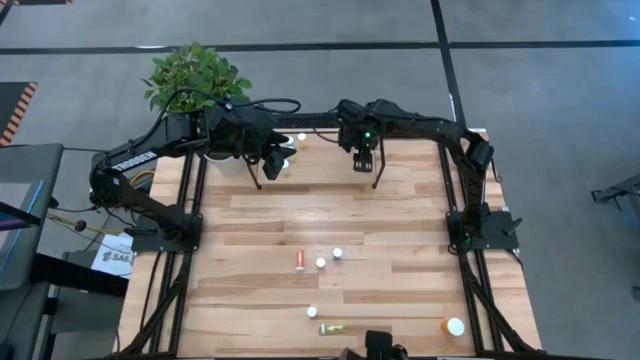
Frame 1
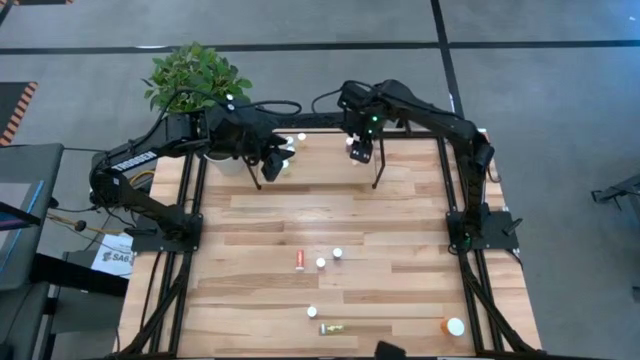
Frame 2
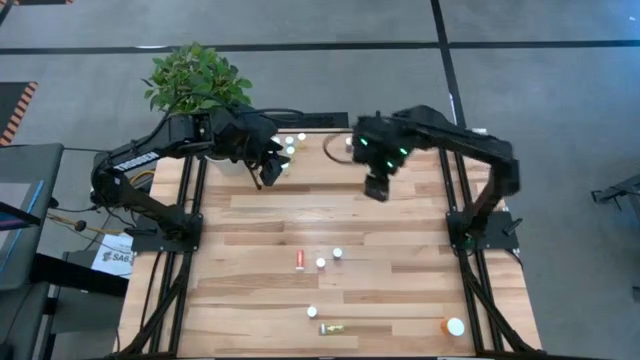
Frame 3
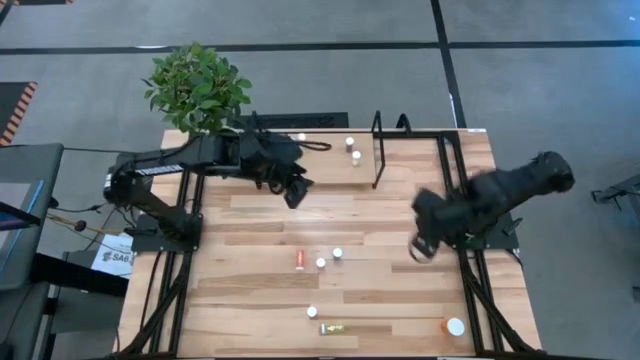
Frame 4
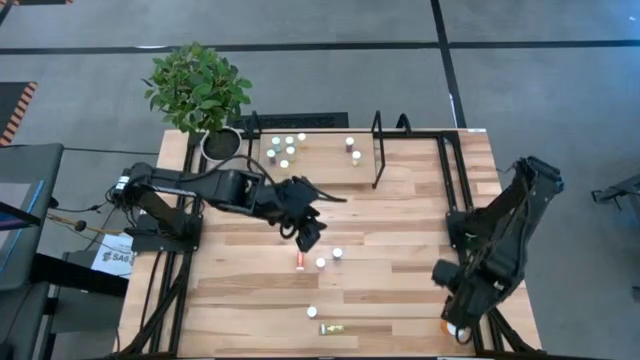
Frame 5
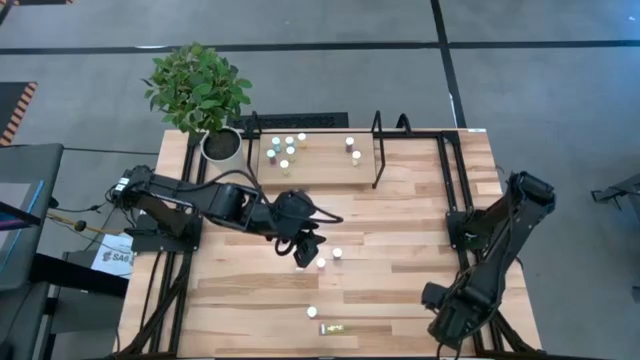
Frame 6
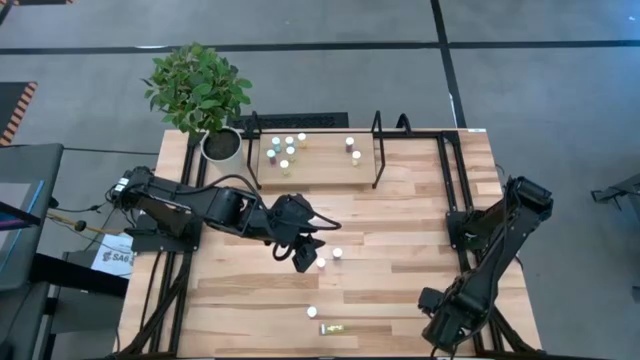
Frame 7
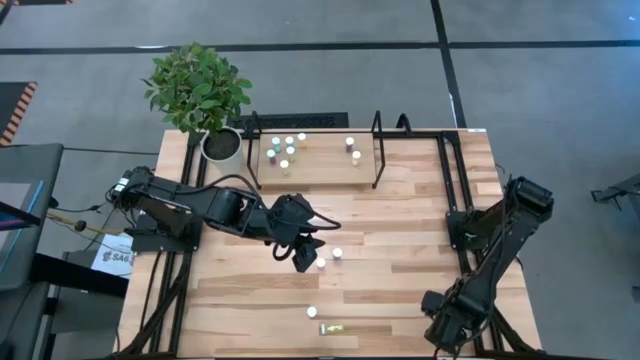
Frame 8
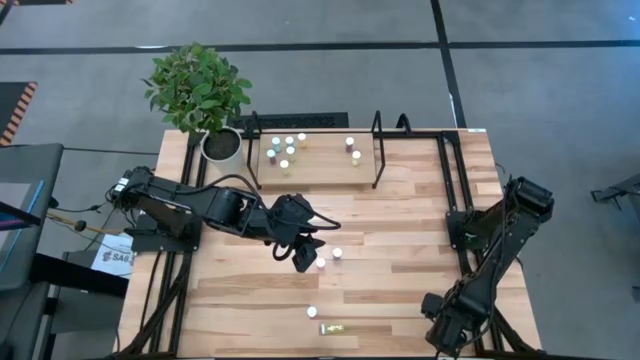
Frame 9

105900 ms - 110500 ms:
Task: Pick and place medicine bottles onto shelf by color
Put the orange pill bottle on the shelf

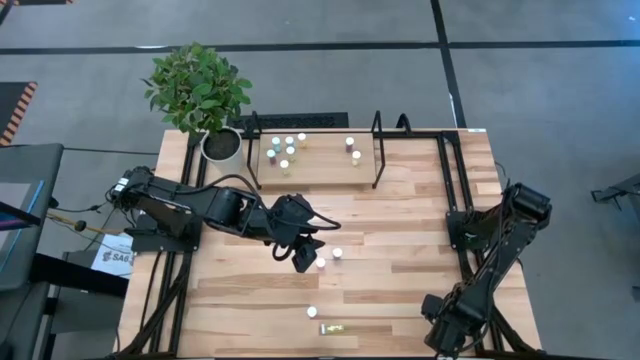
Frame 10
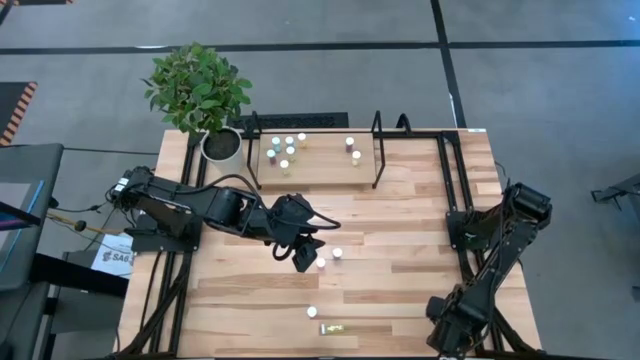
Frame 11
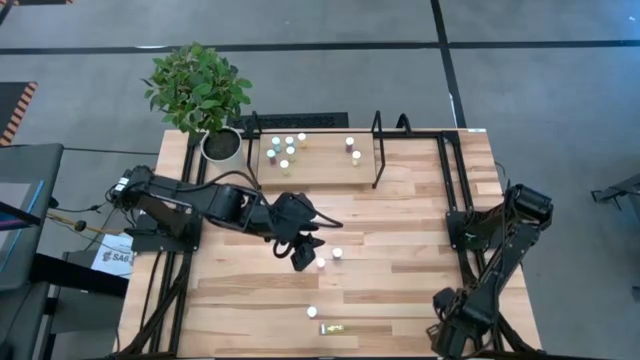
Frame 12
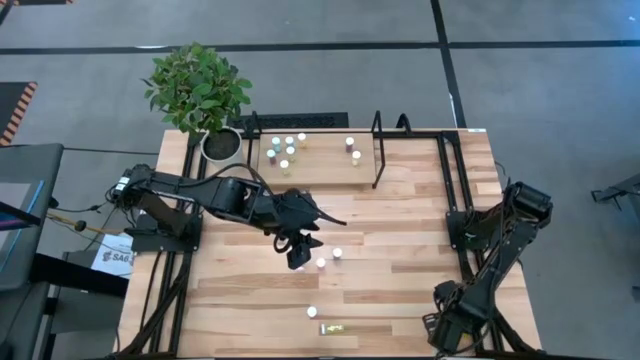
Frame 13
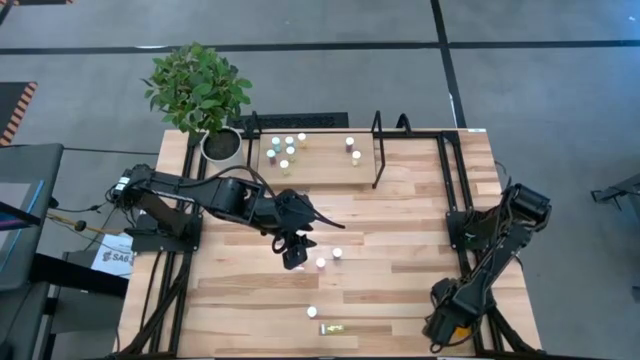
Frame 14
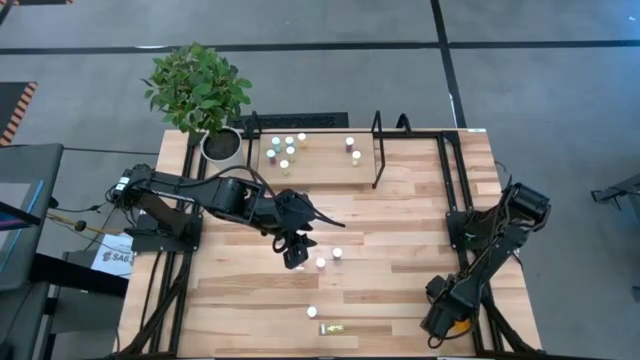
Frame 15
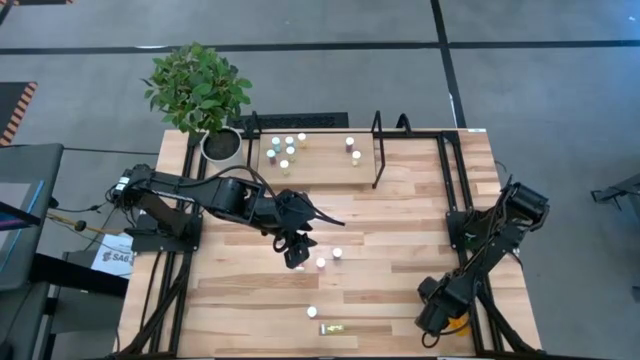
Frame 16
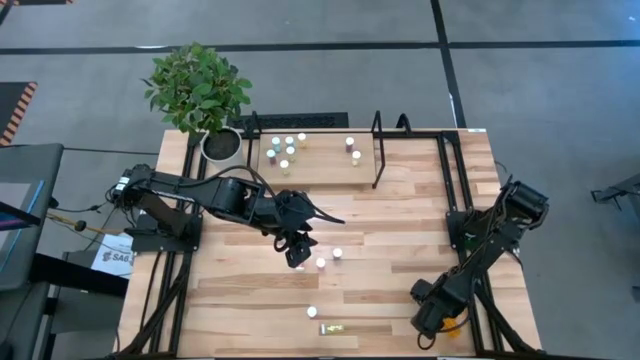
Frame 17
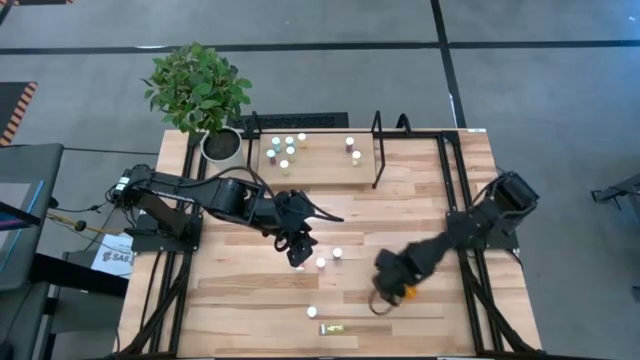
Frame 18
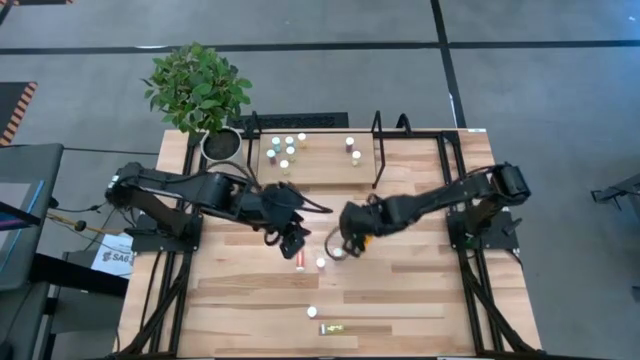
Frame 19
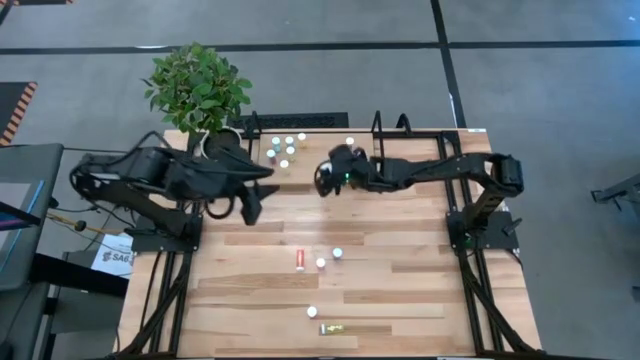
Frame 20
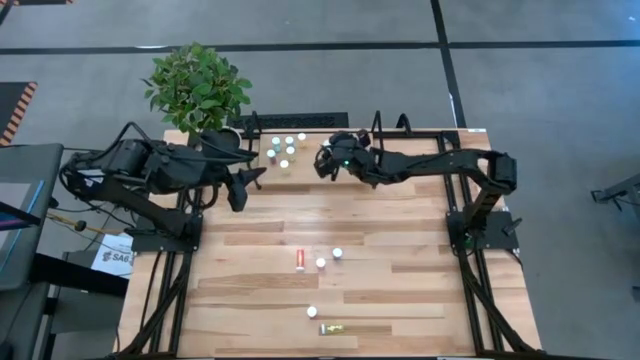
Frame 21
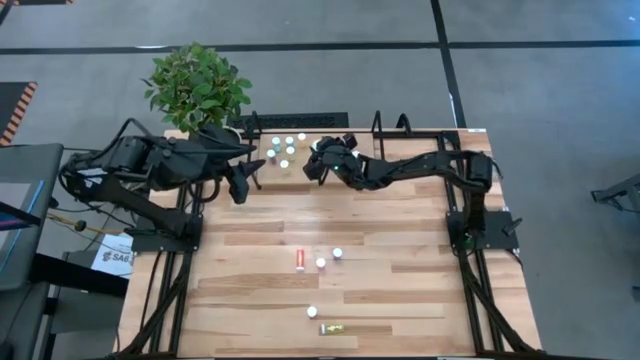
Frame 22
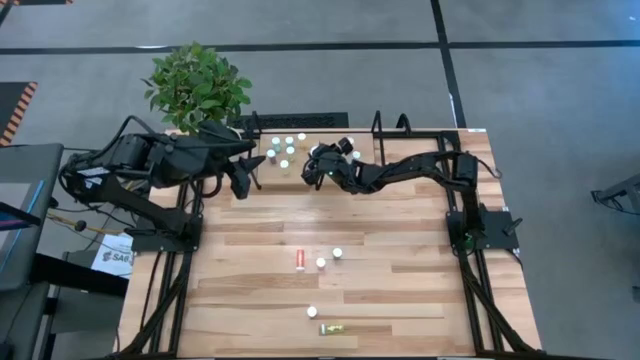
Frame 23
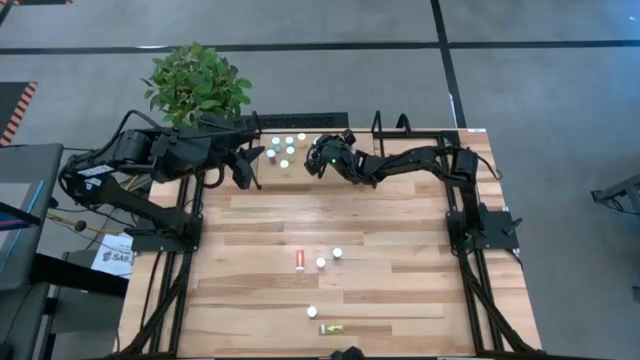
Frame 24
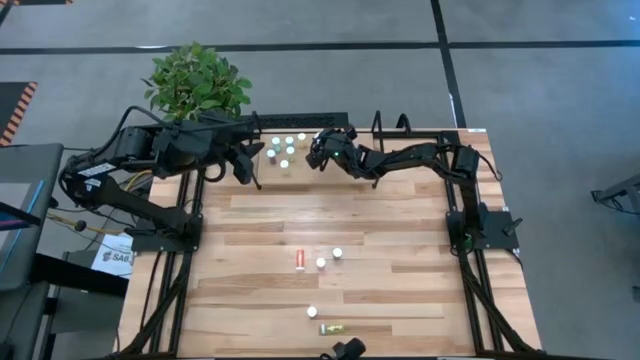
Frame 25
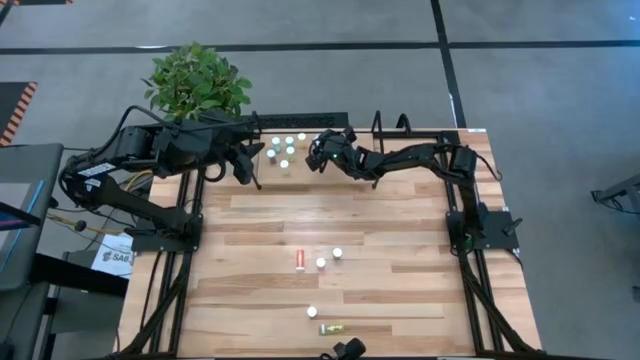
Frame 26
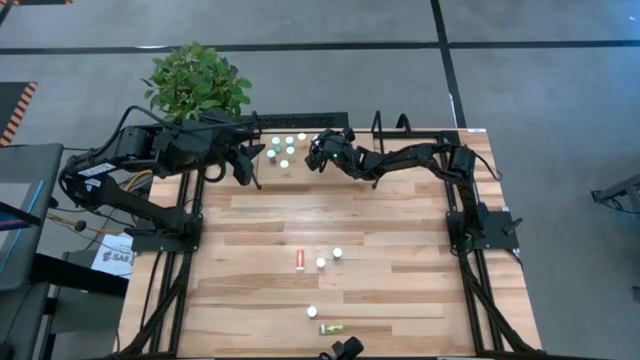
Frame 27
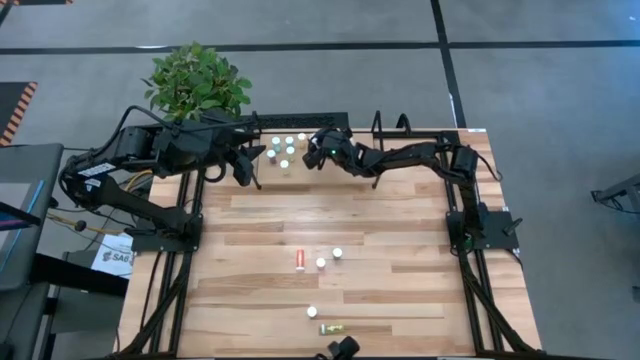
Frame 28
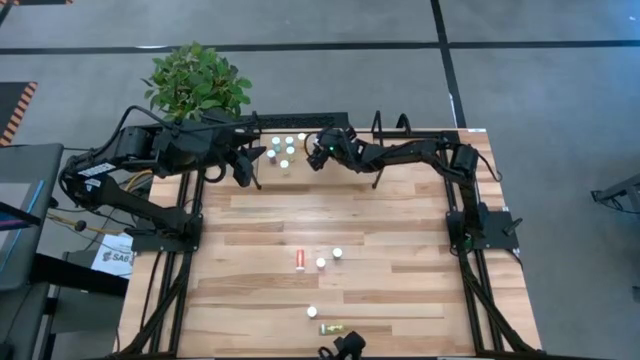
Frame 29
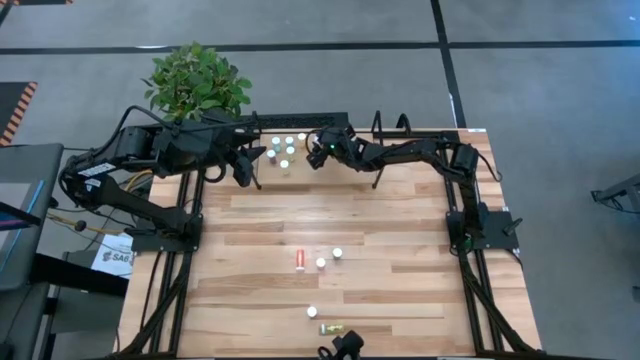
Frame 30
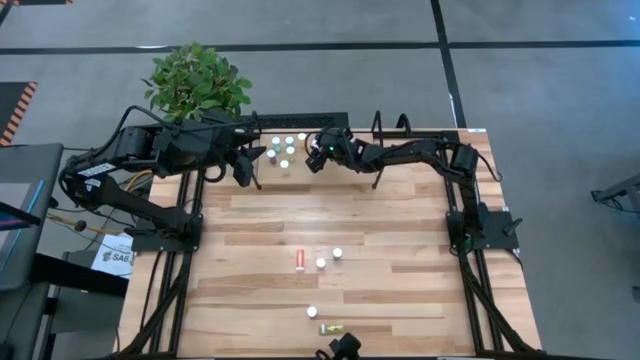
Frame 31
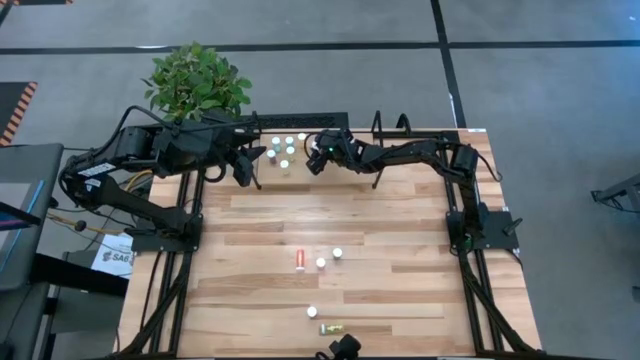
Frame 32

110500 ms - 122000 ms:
Put the orange pill bottle on the shelf

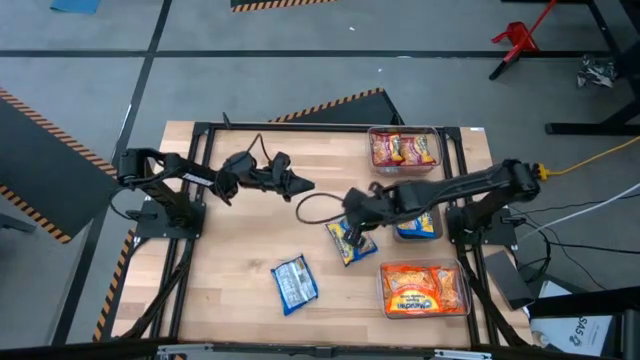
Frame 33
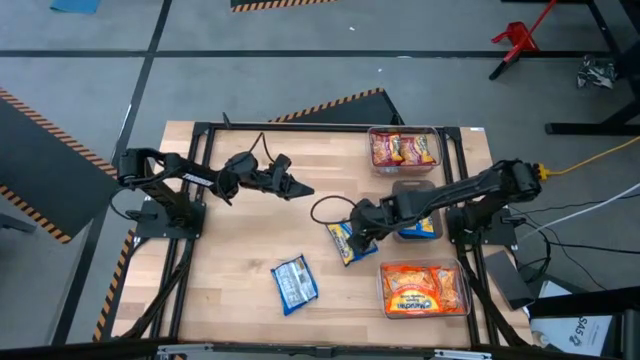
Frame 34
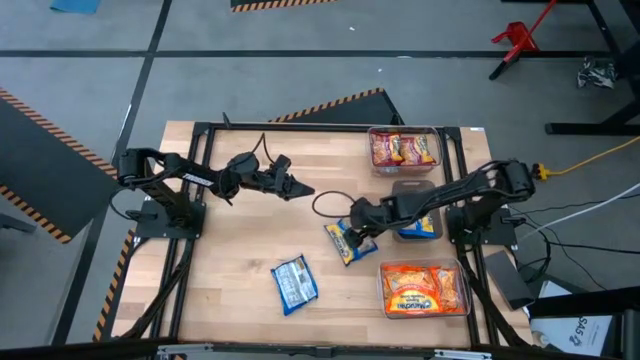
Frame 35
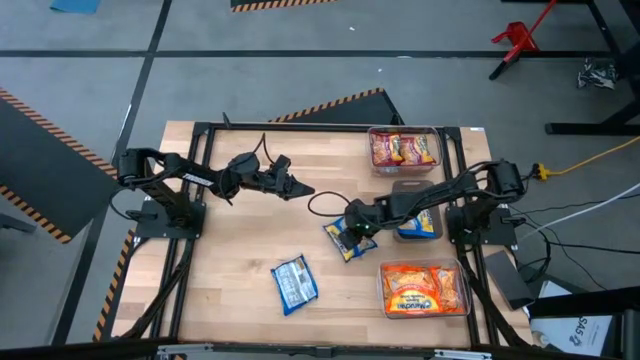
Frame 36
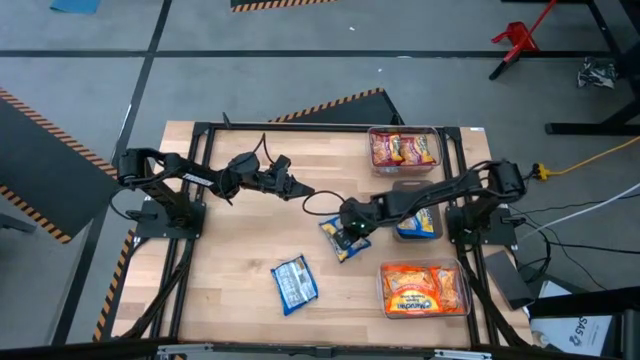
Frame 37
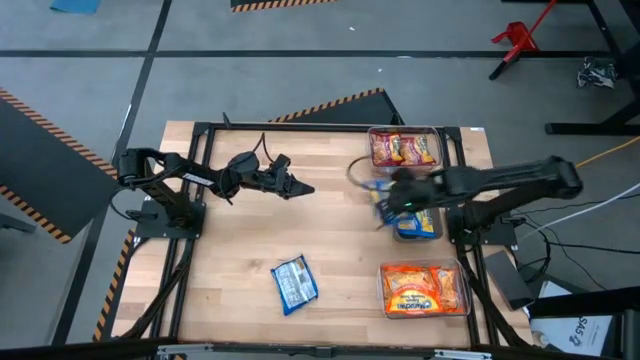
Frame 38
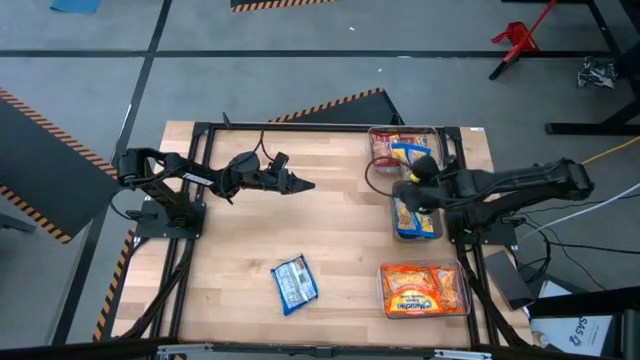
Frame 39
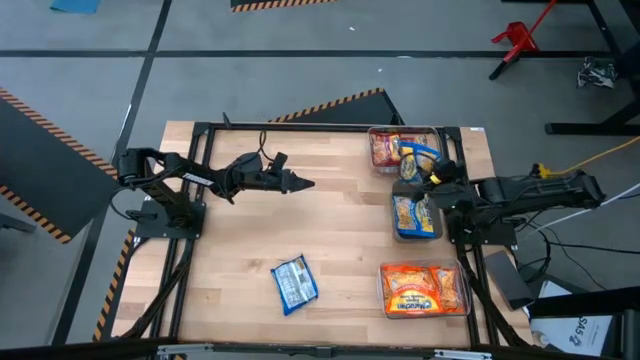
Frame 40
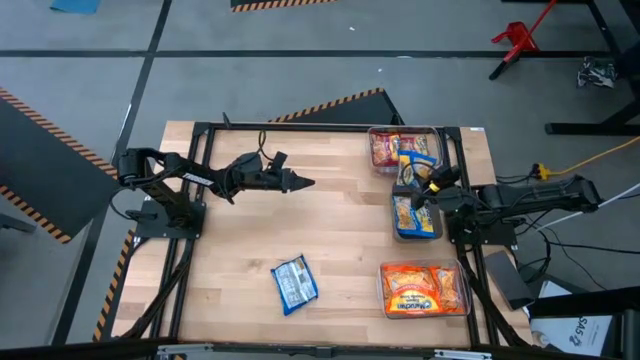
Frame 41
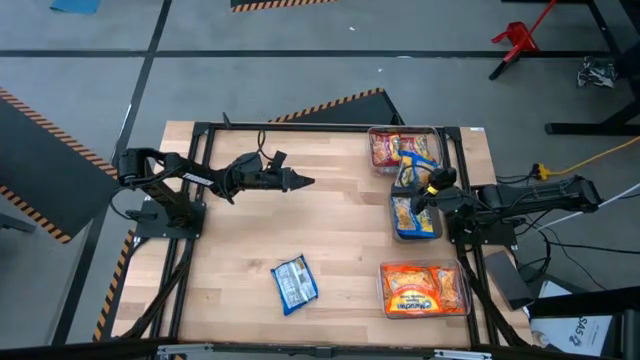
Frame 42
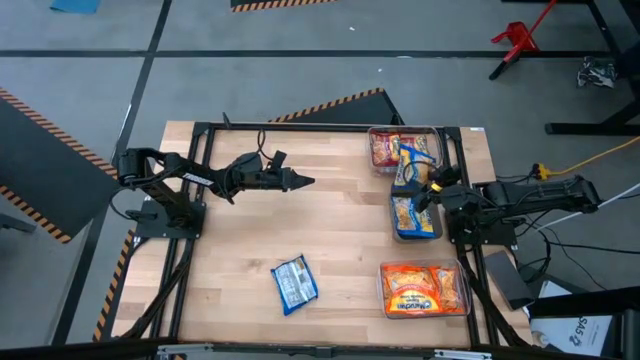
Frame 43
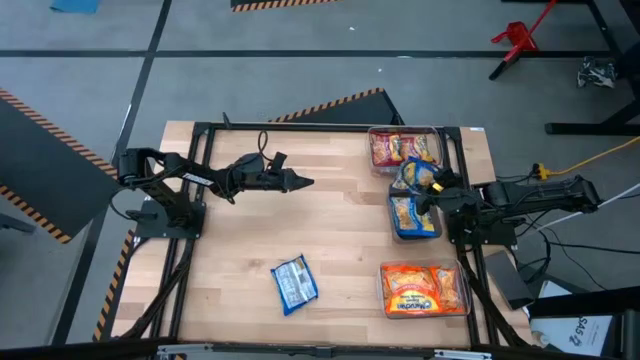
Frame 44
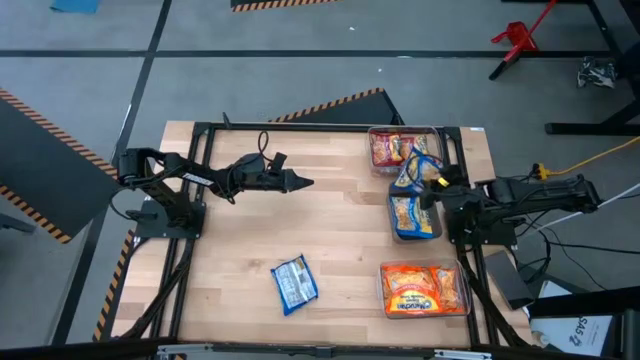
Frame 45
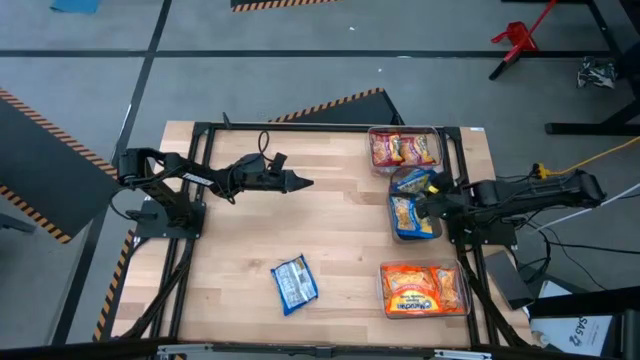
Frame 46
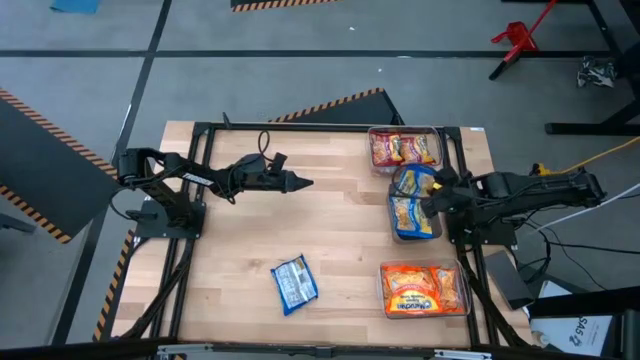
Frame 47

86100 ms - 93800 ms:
Task: Sort Maruchan noodles
Put the blue noodle packs into the black bin
